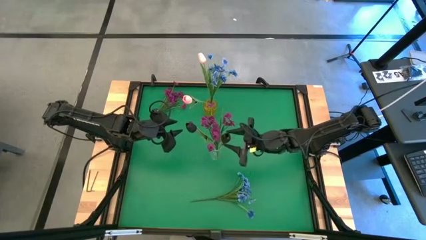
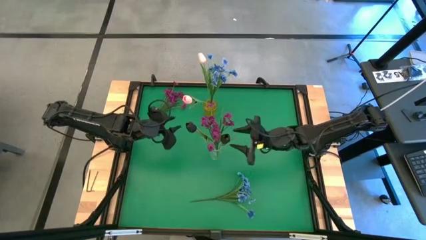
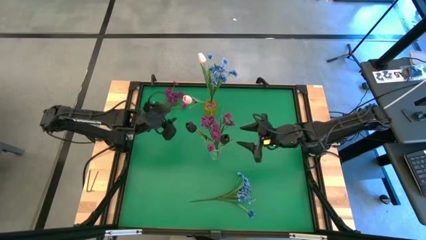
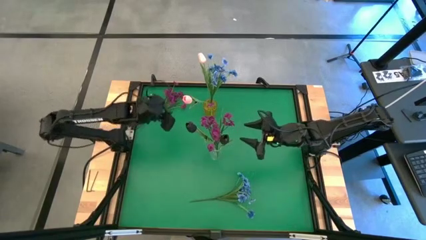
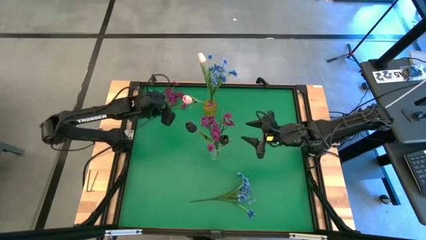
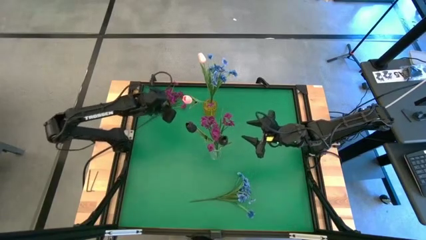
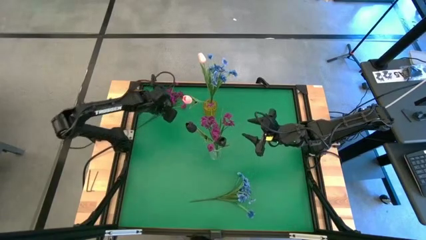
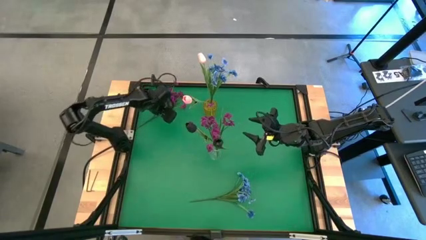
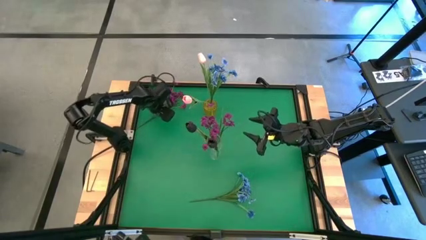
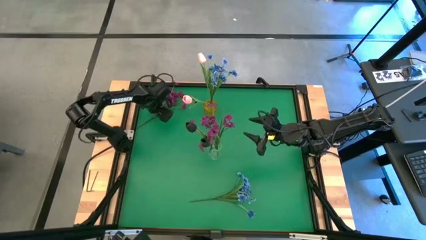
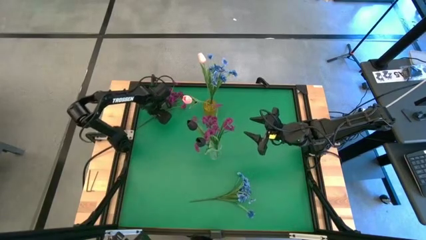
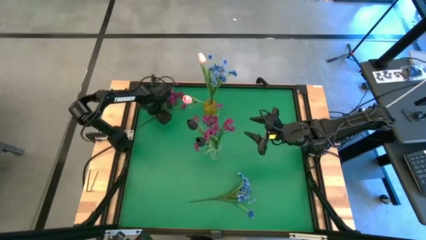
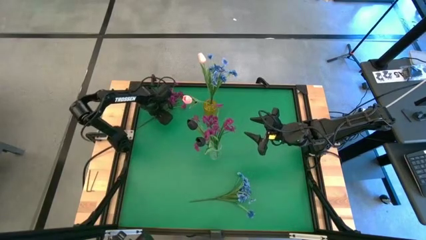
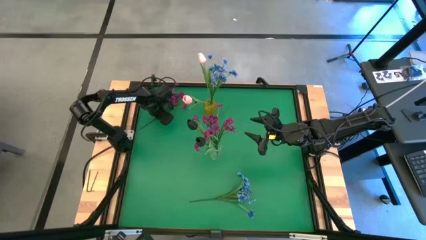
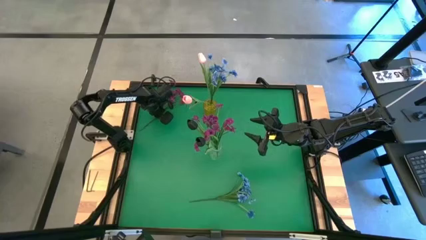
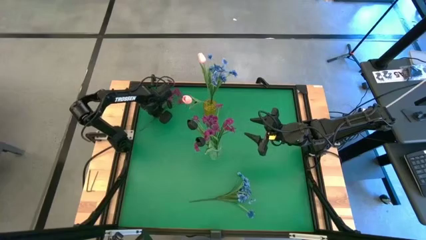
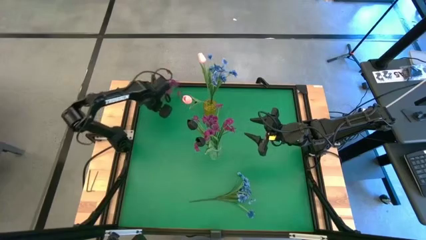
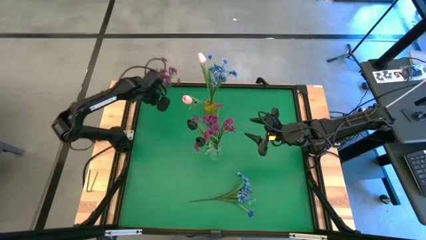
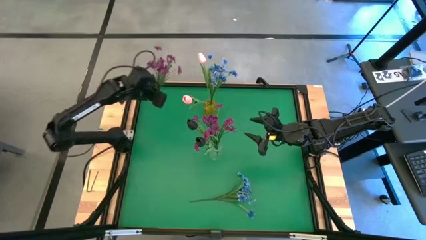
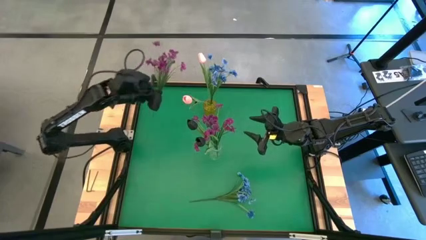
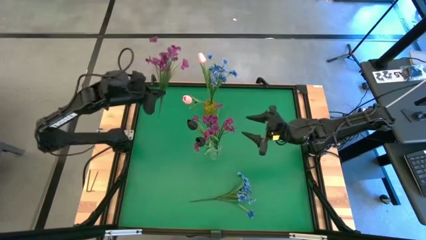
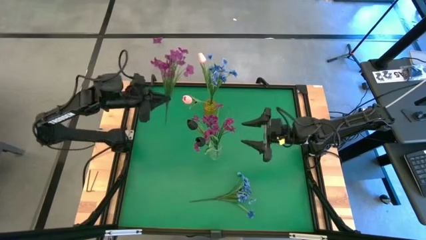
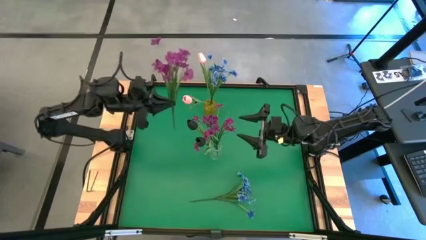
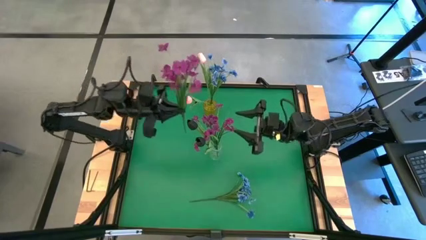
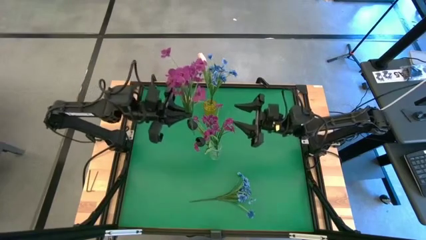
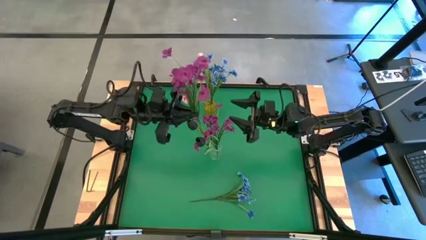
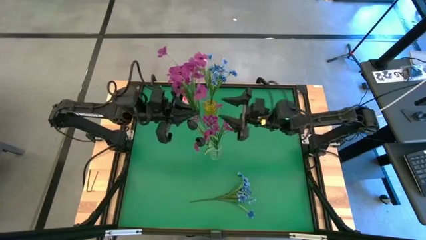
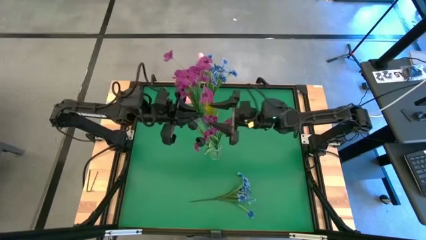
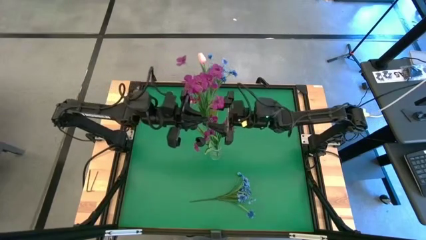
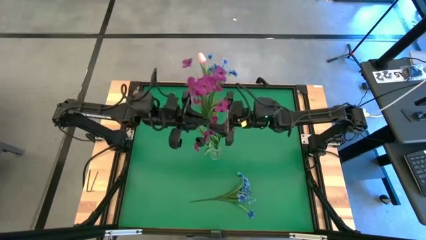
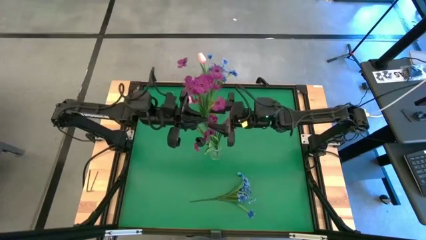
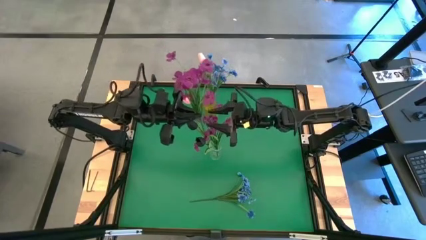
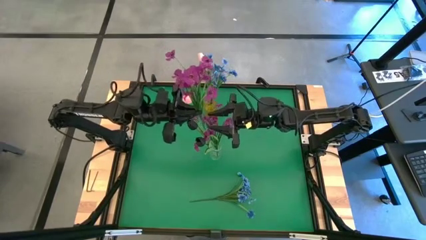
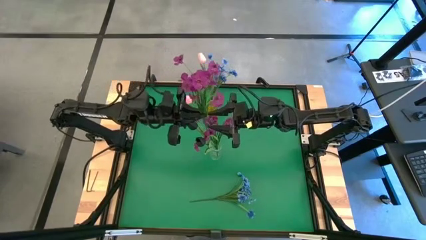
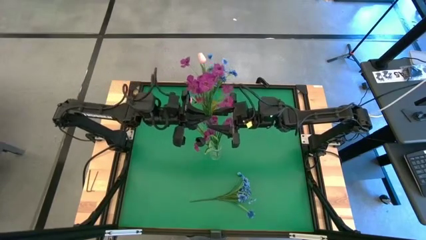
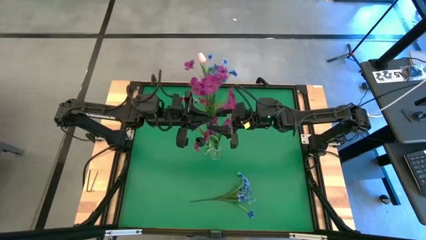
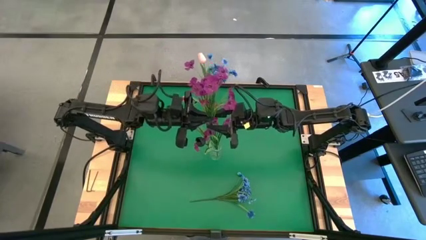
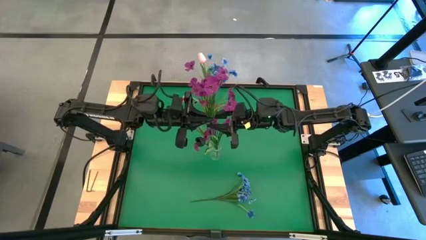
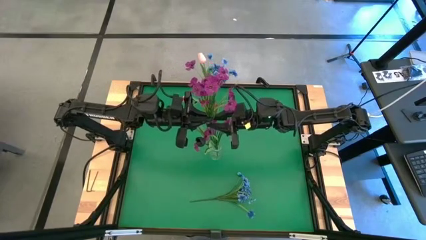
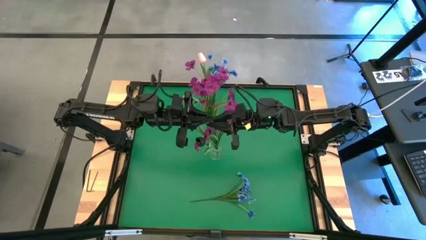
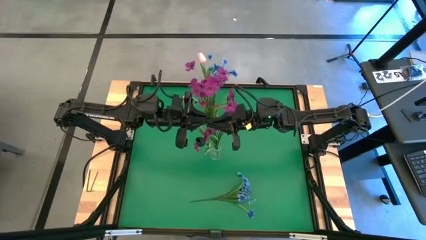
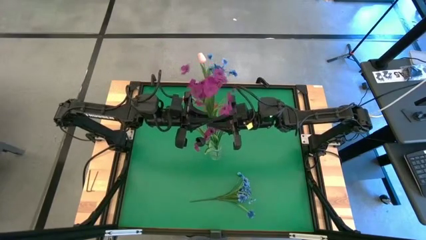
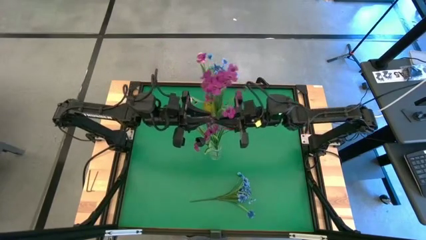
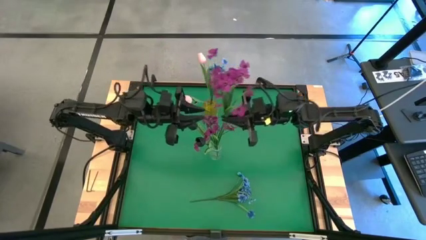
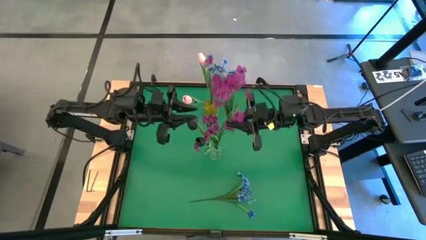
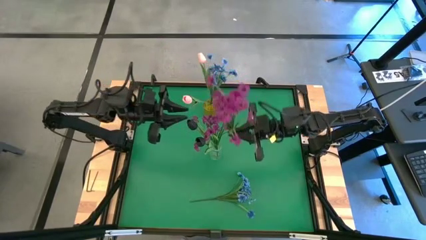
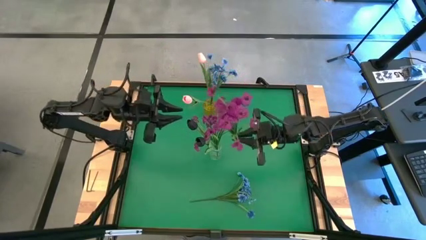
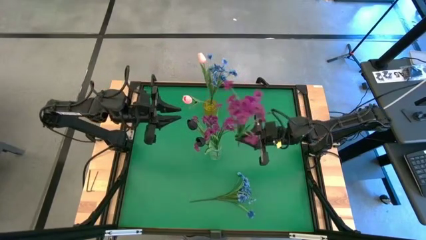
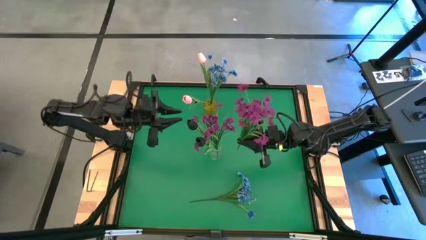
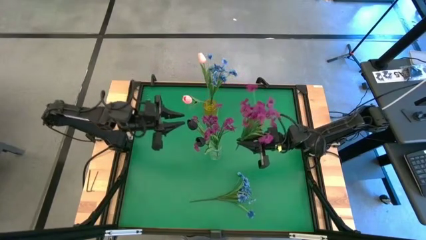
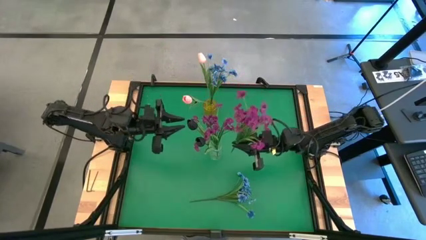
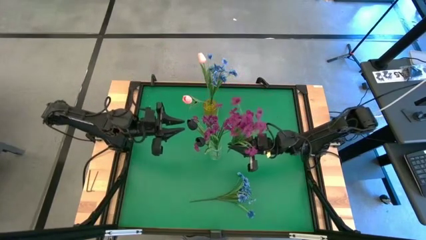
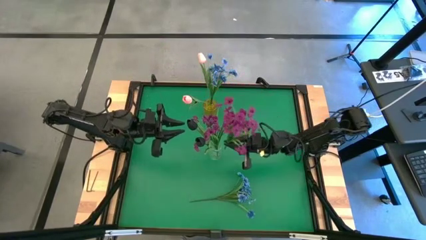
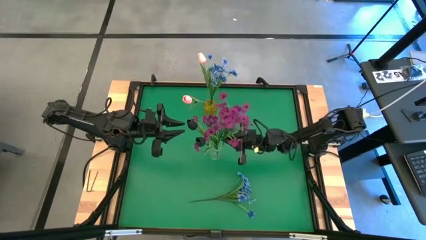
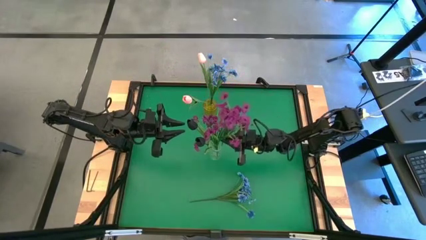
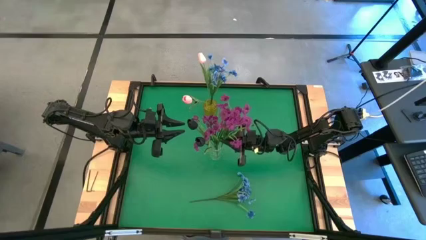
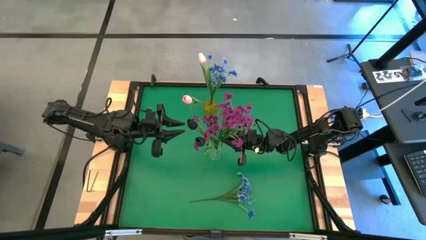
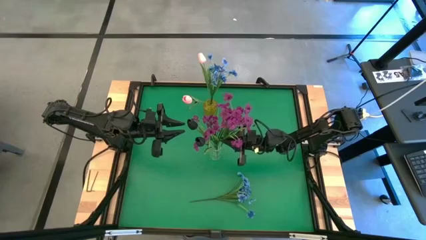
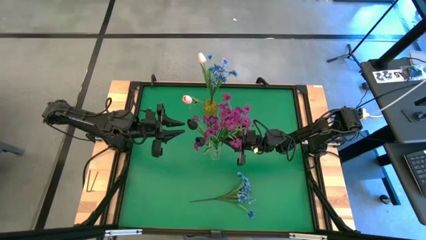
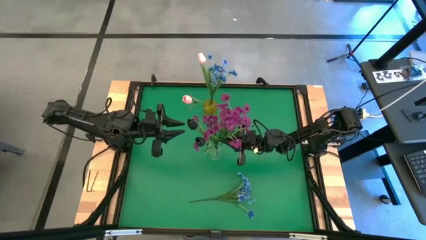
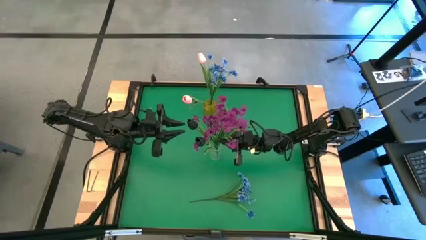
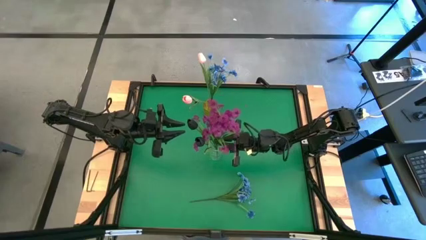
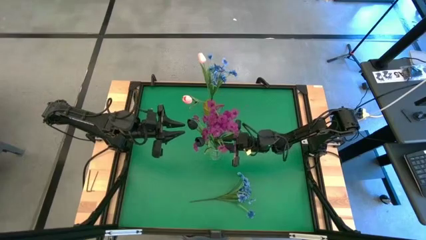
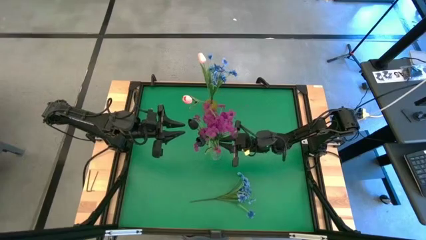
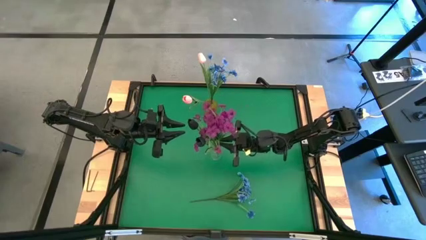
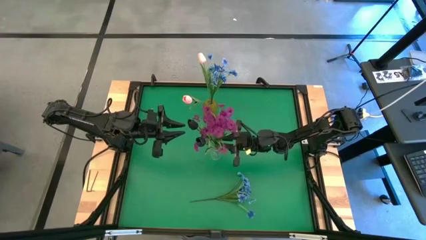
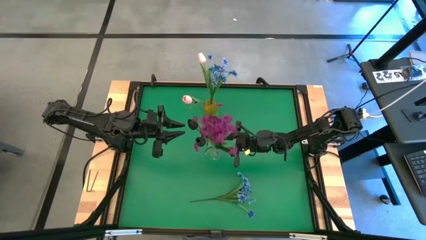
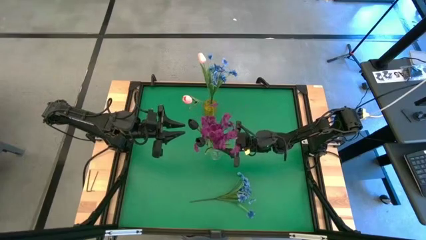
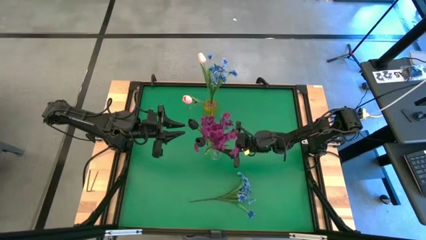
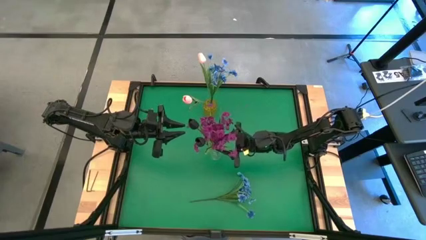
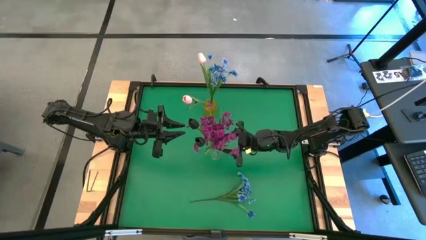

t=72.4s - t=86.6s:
Task: Sort flowers into vase by color
Put the purple flowers into the transparent vase

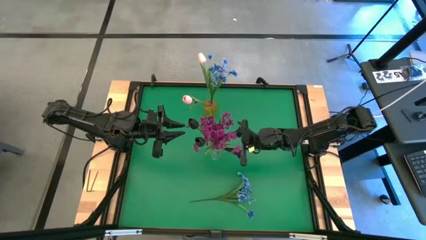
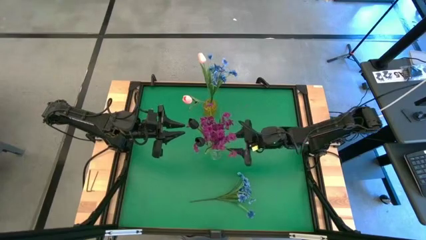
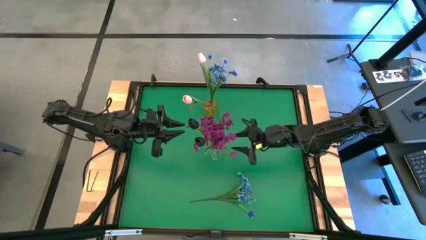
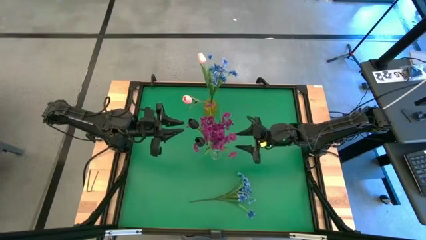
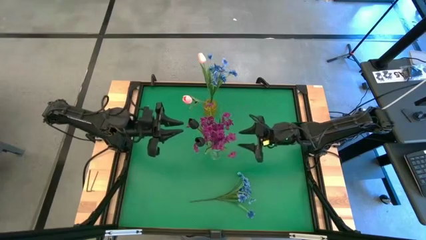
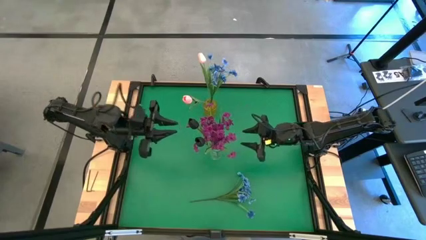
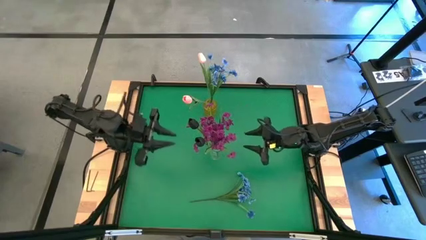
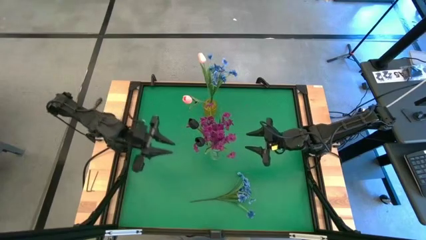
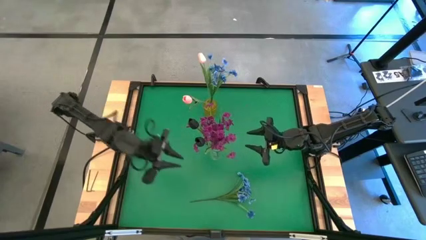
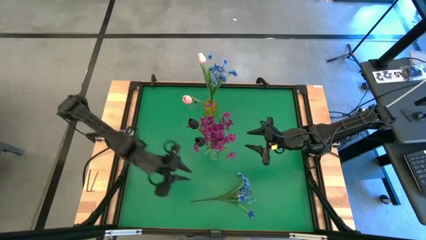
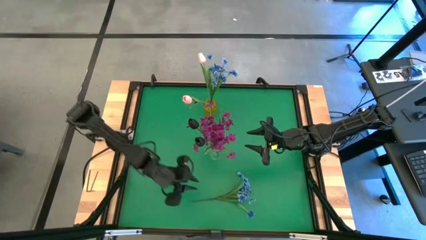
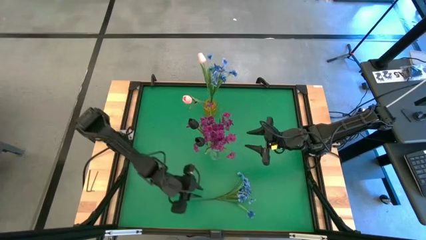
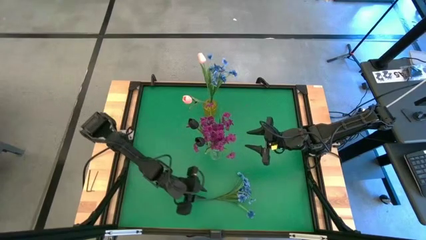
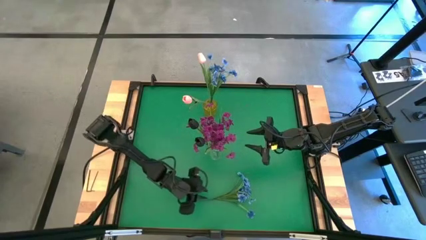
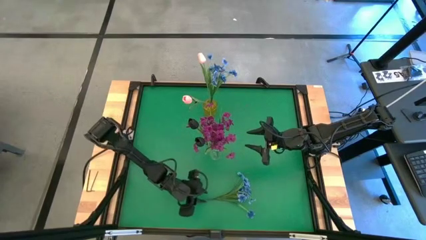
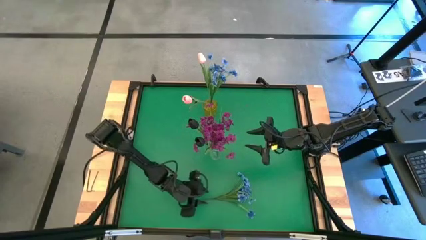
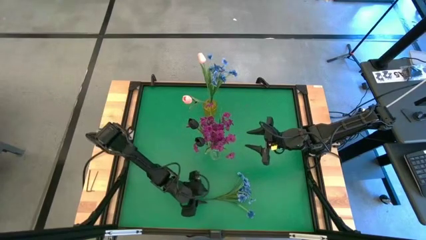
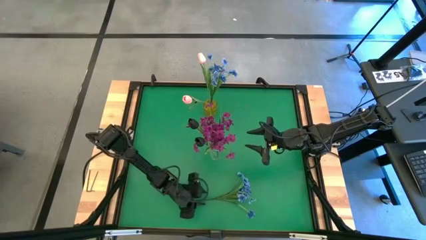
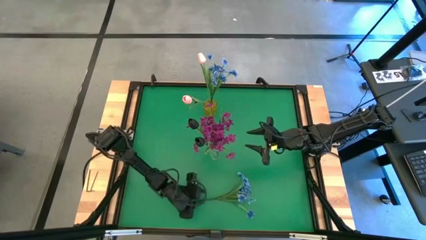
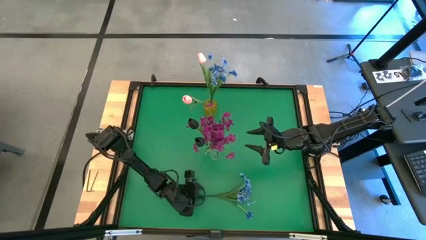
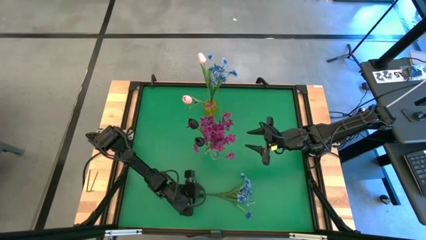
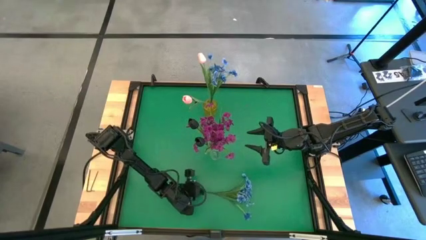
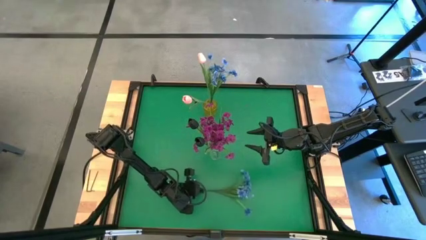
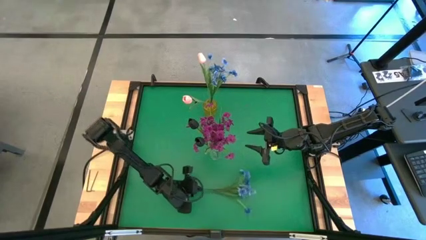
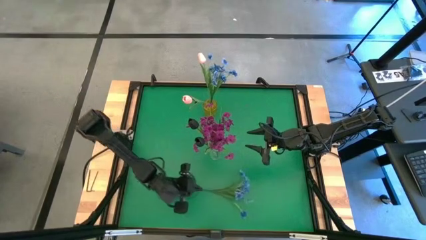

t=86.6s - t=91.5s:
Put the blue flowers into the yellow vase
